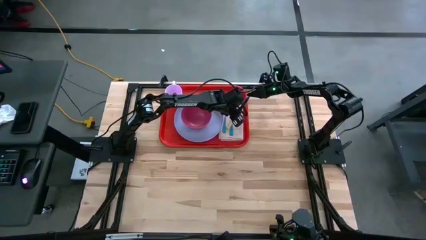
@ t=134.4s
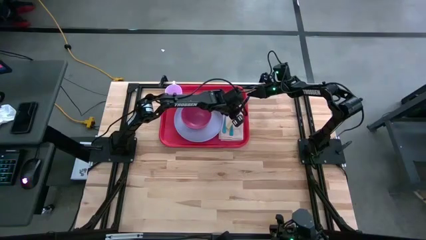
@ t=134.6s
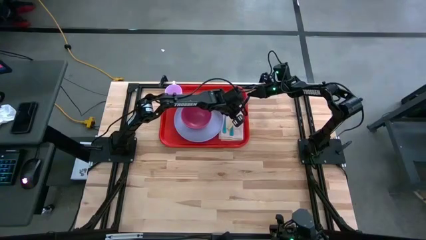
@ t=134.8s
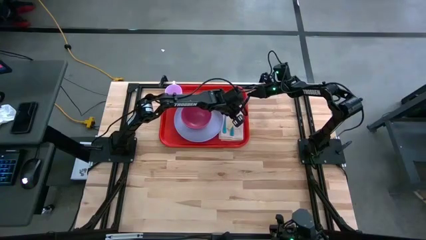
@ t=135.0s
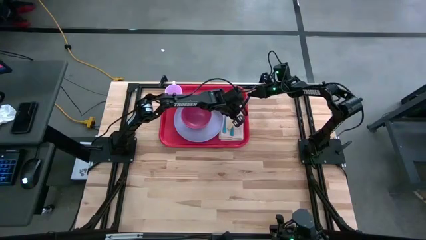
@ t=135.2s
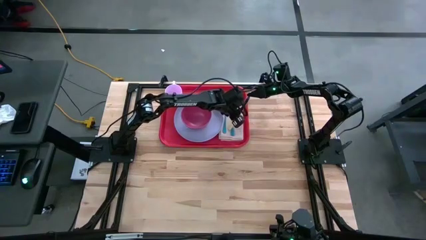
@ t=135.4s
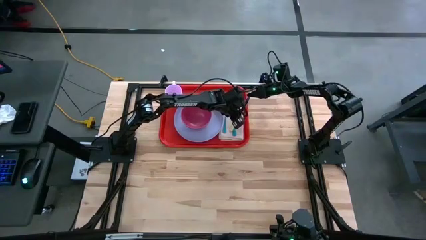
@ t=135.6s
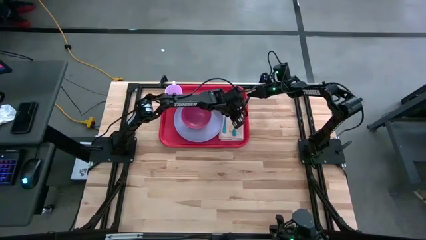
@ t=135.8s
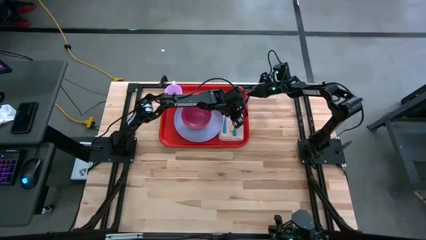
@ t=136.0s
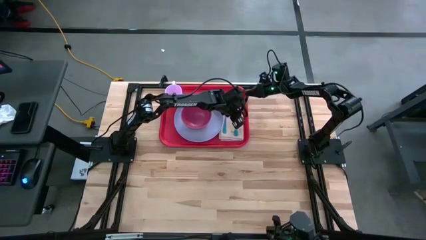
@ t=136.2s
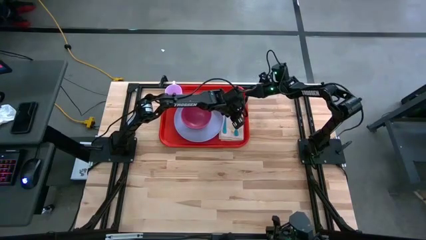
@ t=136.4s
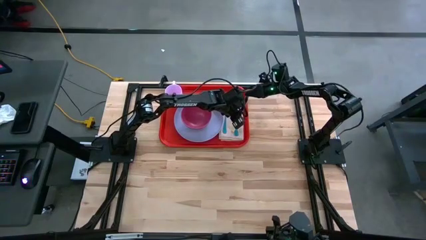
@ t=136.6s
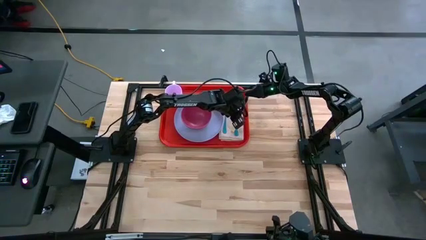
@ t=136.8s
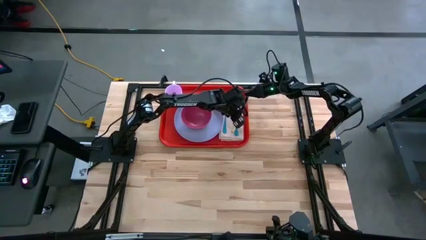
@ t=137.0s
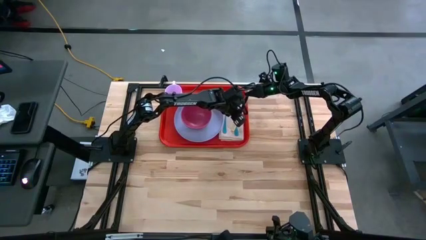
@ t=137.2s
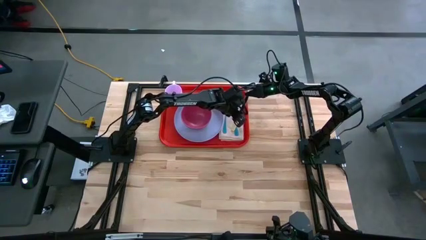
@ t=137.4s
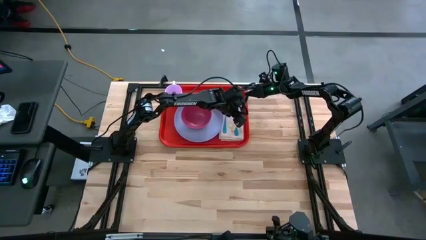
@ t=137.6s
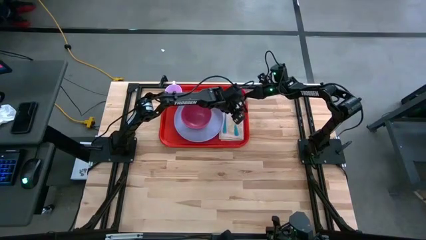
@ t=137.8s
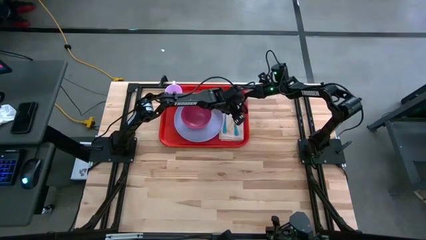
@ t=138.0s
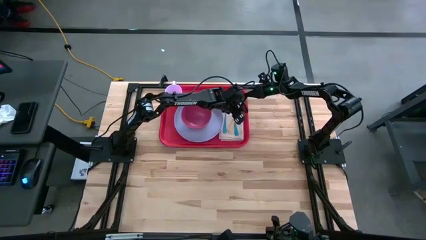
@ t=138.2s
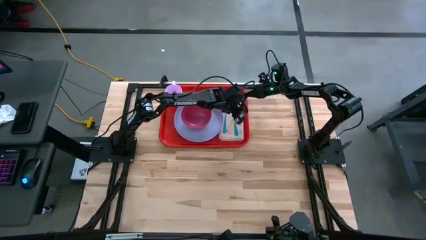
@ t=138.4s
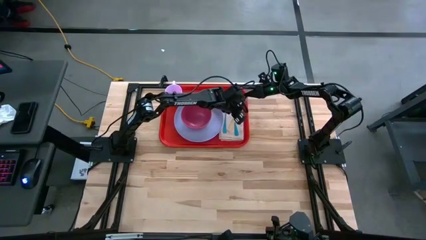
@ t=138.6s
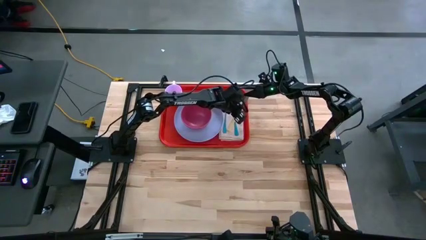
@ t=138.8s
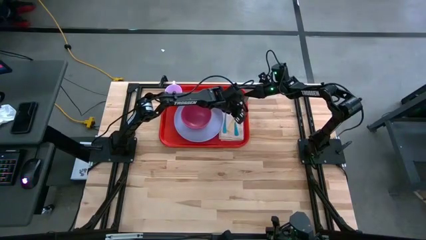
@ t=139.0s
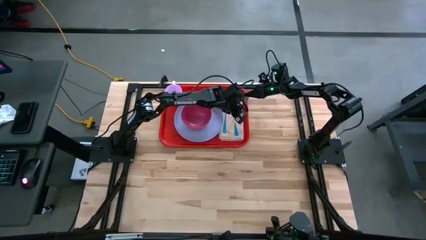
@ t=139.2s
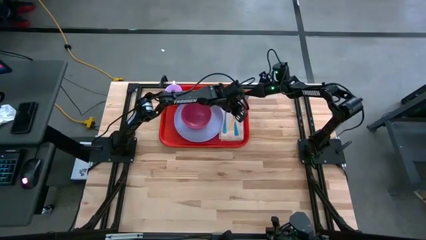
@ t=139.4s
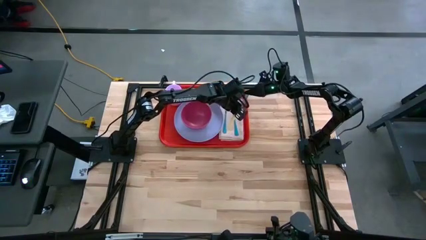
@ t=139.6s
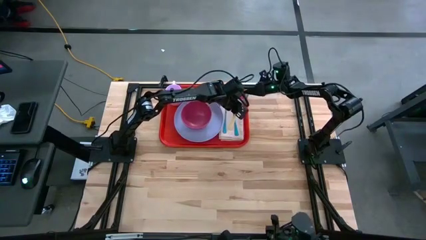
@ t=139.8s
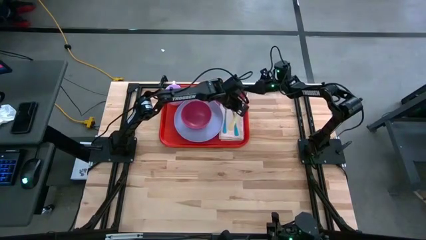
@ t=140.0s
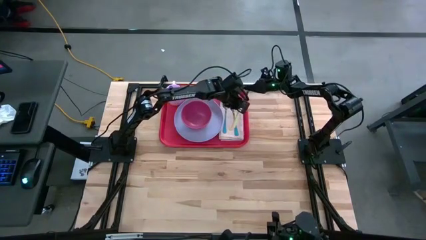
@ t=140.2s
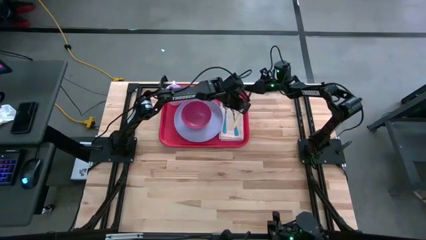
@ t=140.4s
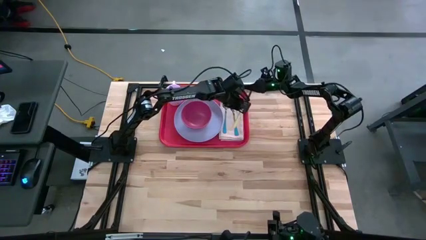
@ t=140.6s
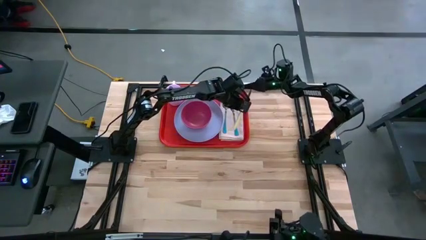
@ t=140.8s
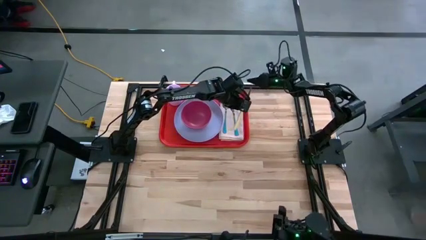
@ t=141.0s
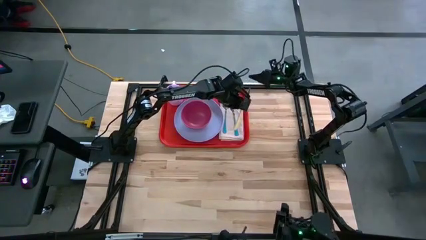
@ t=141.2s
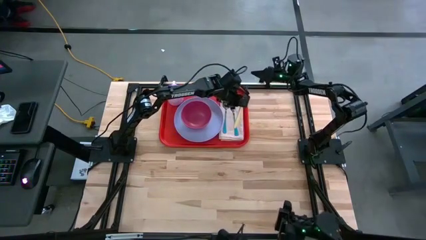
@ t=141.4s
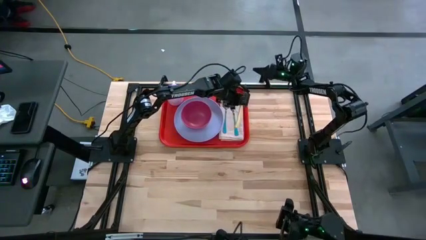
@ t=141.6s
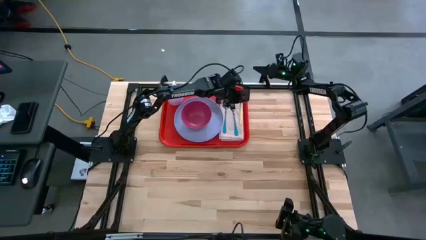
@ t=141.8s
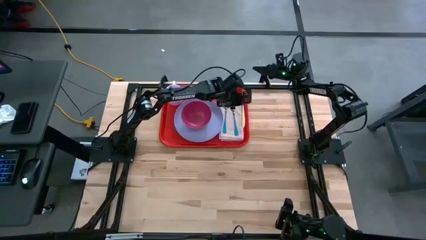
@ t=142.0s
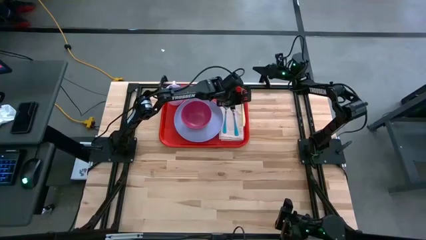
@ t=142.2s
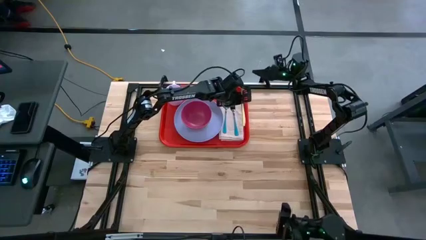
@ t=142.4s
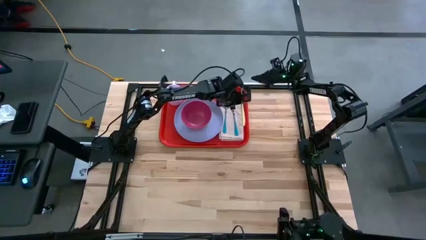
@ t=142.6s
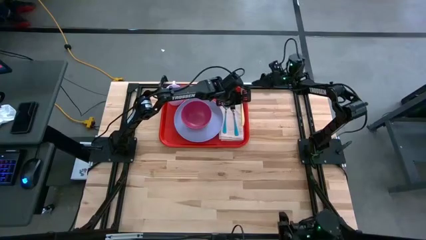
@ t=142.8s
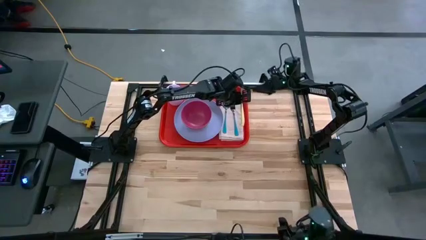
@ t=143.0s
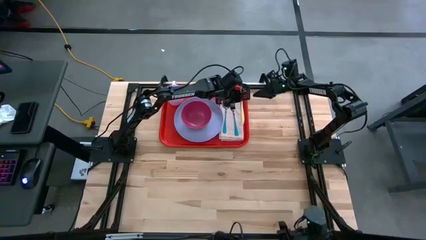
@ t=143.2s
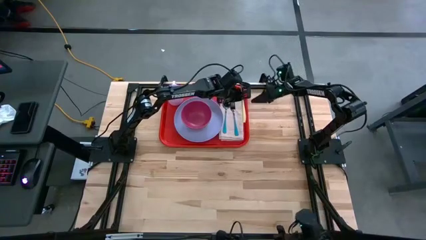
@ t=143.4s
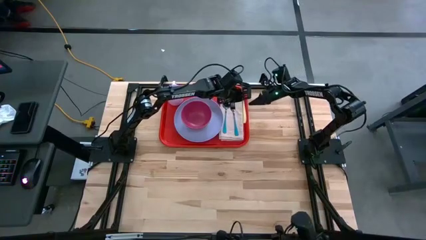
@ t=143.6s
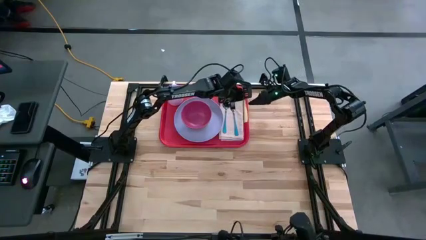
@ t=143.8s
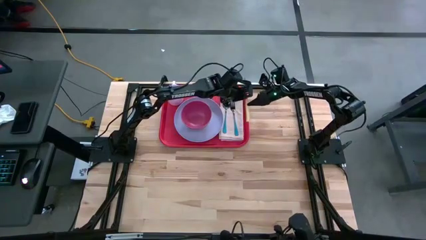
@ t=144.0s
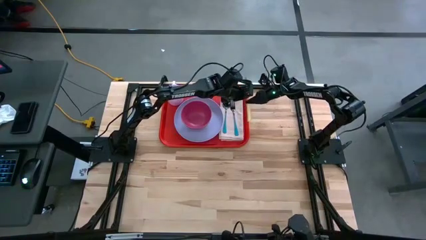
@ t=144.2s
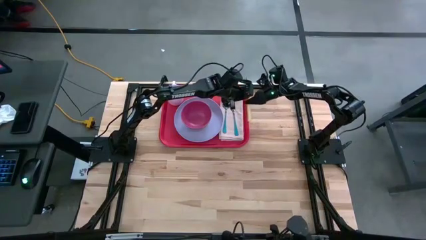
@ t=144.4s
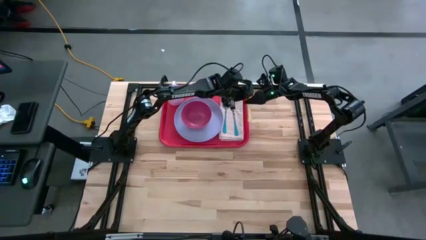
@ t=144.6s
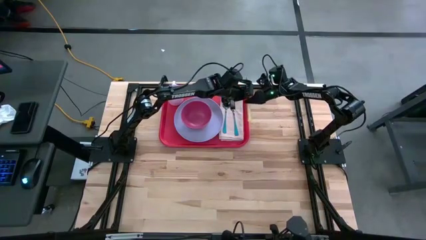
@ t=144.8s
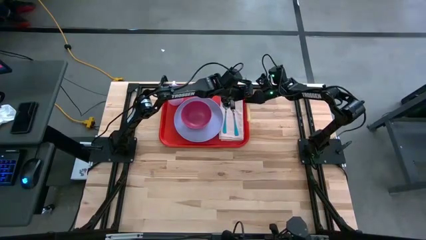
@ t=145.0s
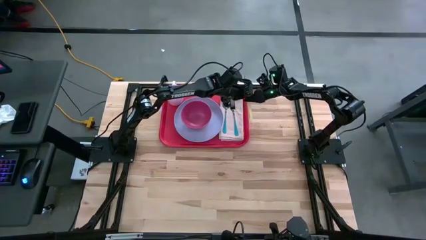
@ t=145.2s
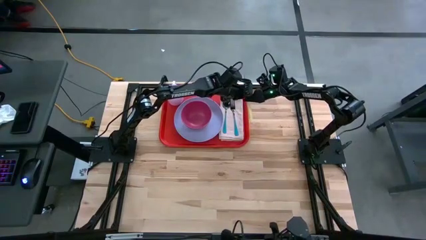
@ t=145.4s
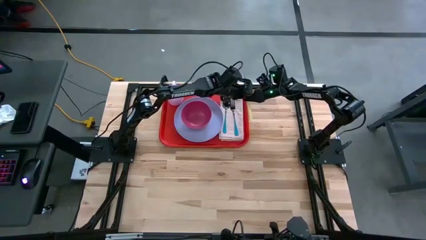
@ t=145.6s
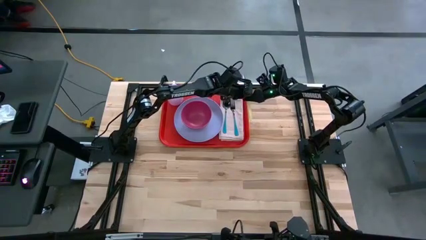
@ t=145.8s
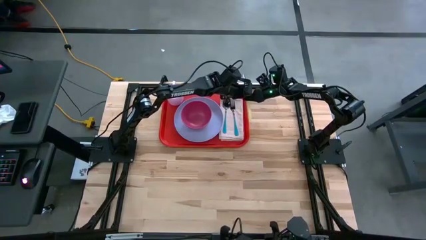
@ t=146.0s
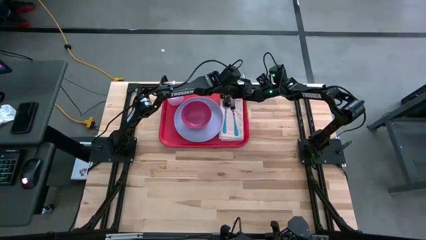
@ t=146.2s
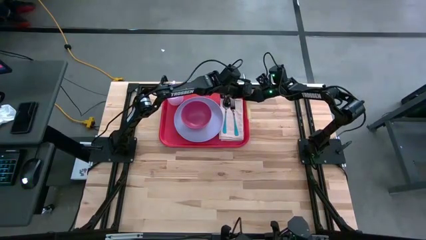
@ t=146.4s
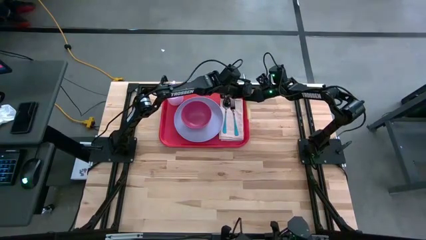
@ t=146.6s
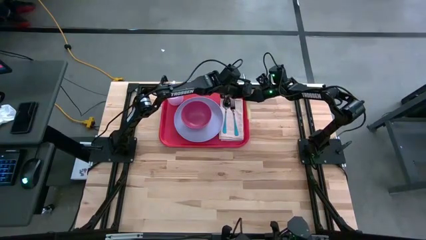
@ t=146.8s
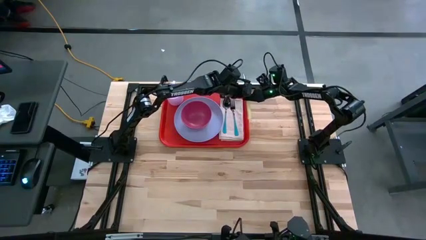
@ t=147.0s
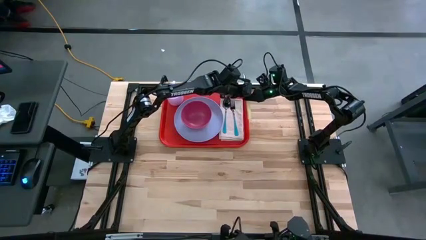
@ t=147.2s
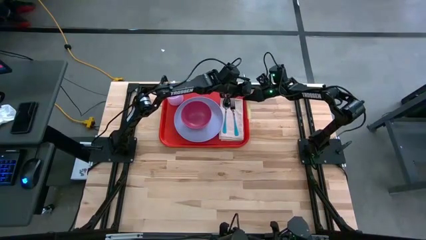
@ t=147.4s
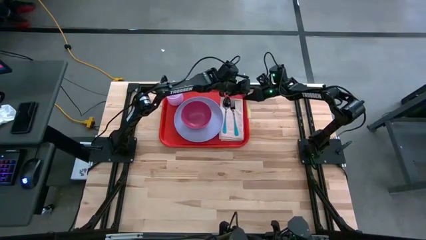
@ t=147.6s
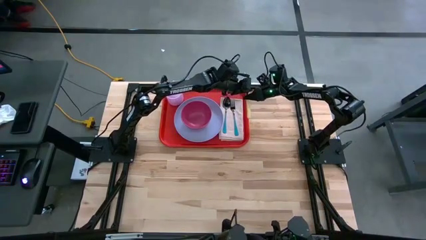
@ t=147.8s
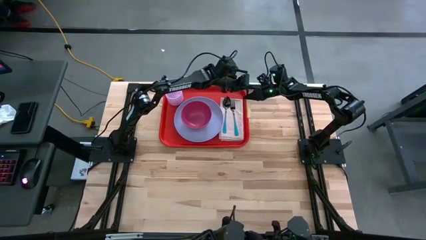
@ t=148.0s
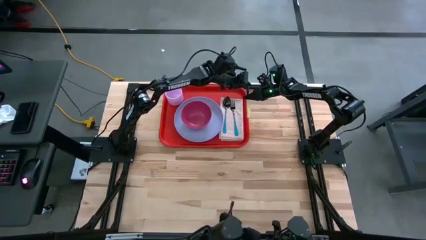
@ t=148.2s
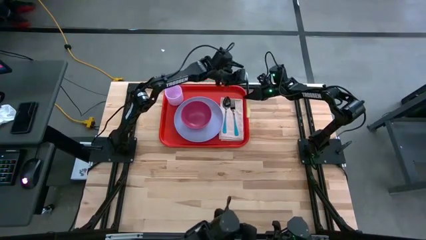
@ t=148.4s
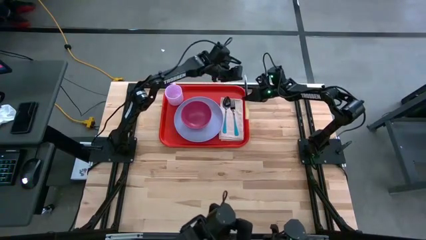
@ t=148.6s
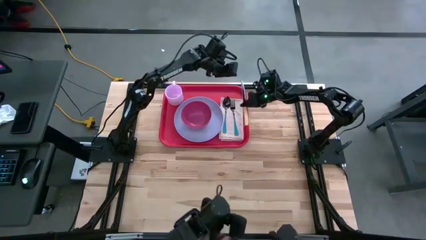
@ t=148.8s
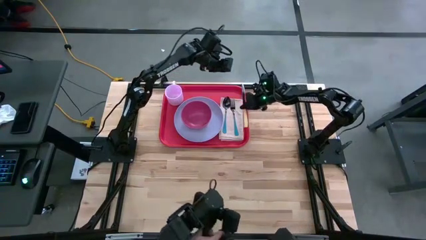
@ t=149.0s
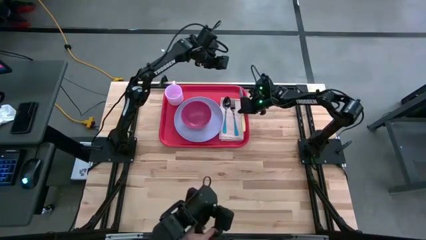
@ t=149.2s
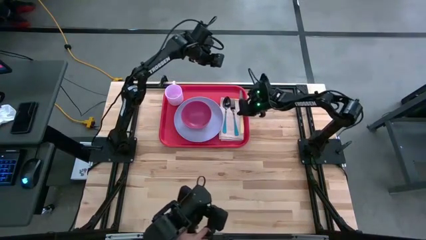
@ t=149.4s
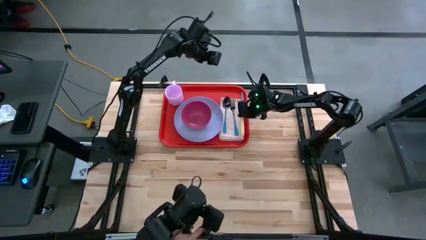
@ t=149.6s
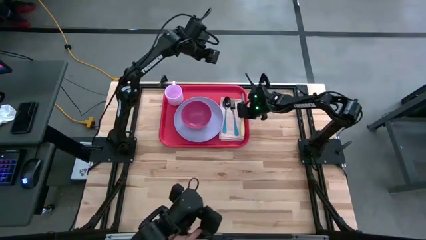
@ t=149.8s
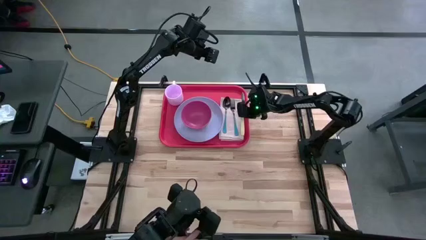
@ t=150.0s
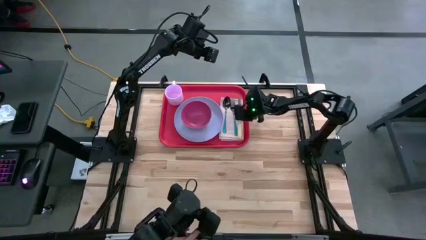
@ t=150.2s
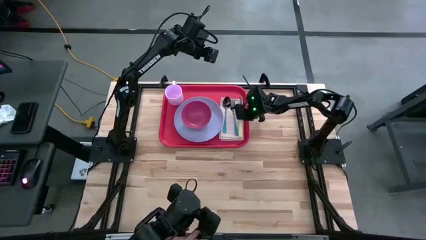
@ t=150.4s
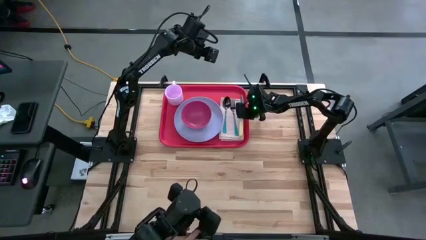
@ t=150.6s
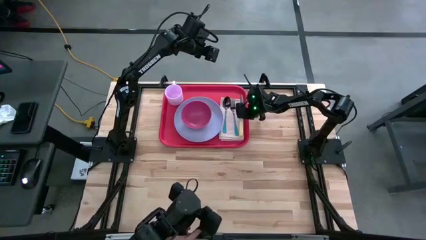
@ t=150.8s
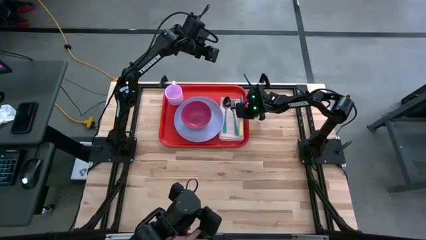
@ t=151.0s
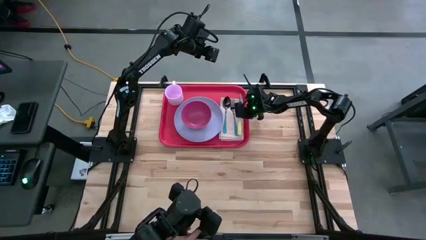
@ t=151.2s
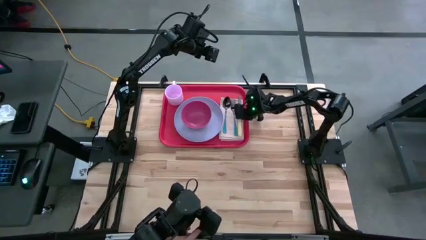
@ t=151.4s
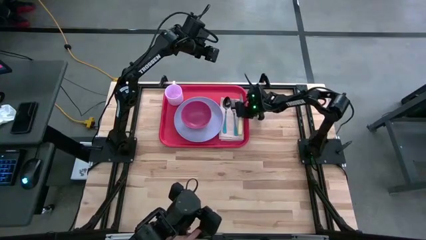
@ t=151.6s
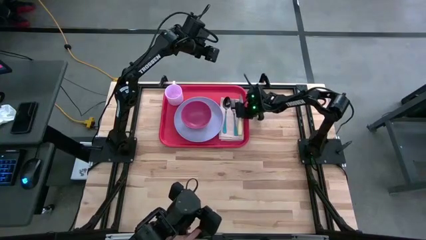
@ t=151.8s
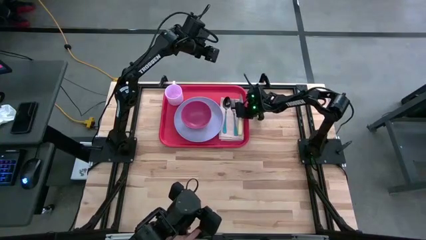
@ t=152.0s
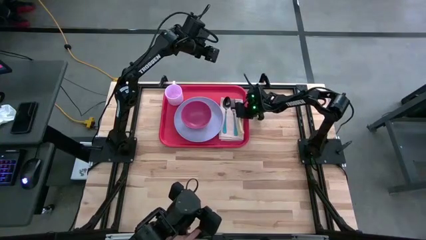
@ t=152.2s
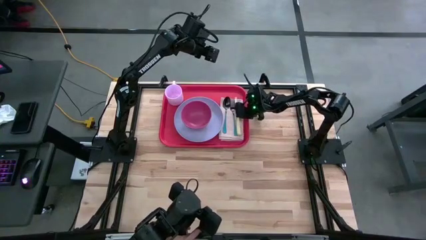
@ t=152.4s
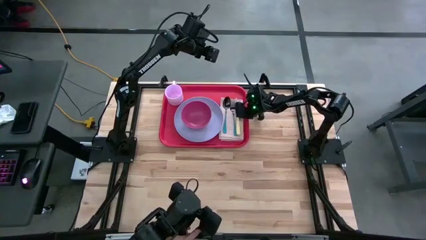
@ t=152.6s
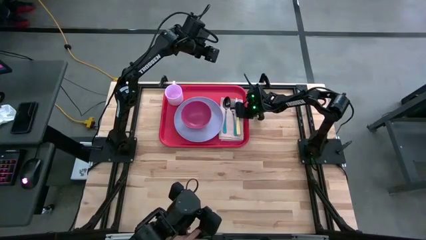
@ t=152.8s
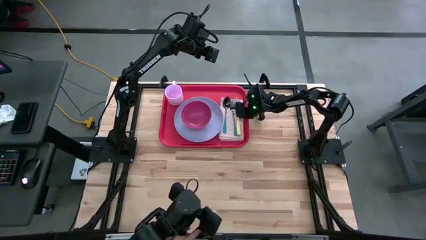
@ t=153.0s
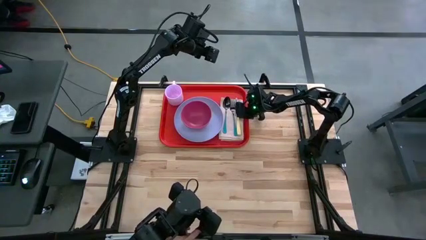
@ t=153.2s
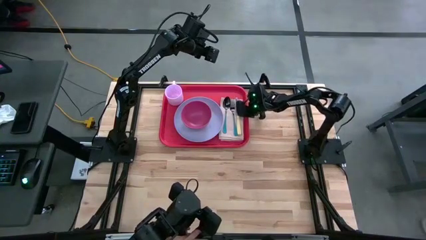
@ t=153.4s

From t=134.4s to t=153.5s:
Task: Set up tray
Put the yellow knife on the brown napkin
